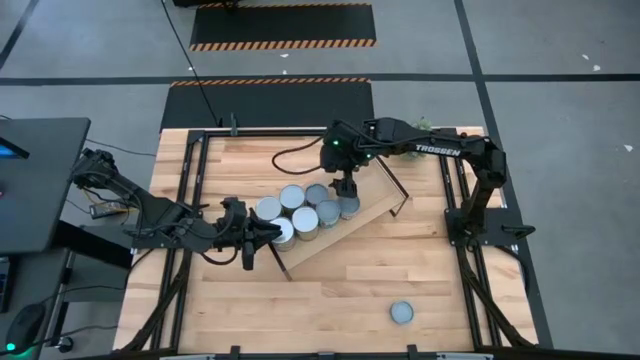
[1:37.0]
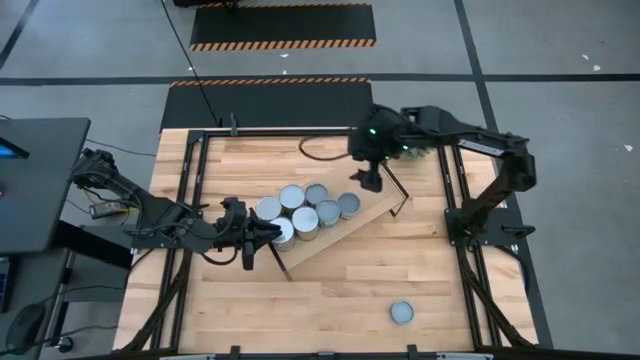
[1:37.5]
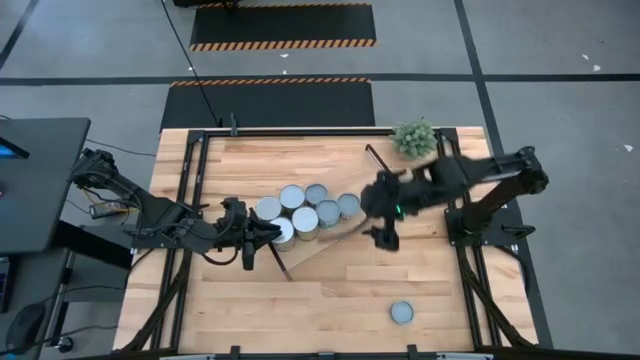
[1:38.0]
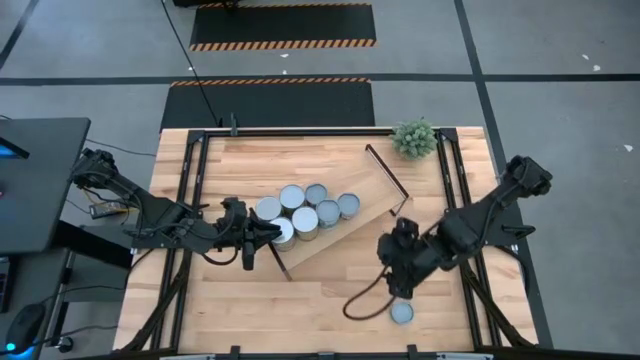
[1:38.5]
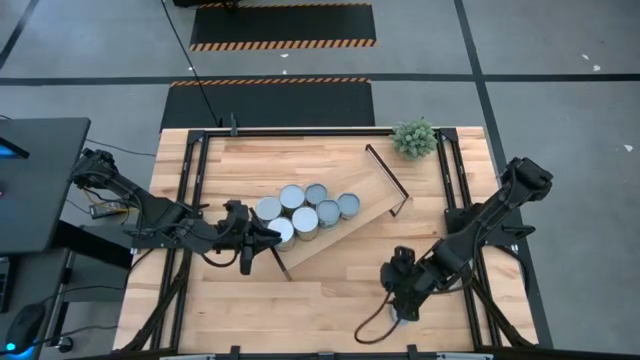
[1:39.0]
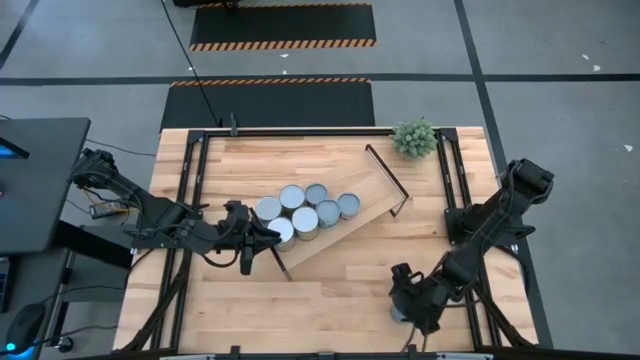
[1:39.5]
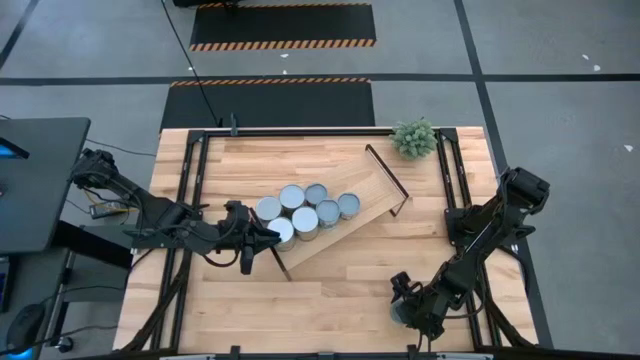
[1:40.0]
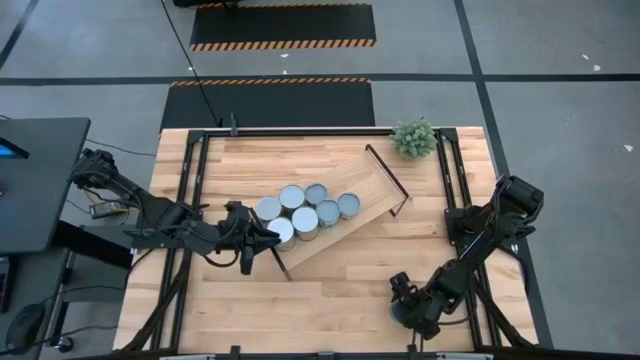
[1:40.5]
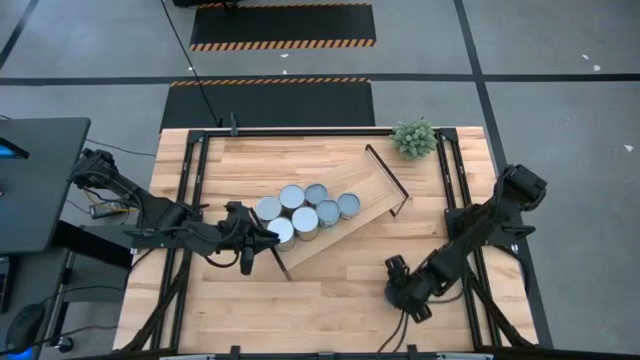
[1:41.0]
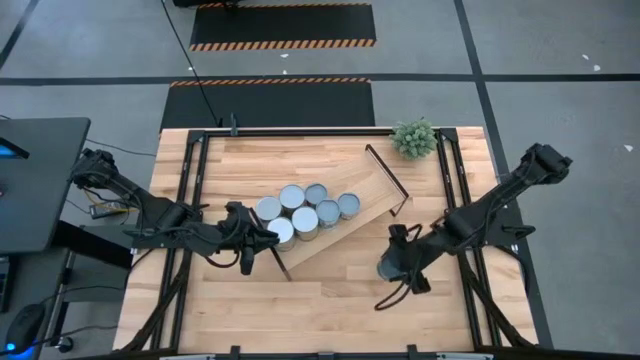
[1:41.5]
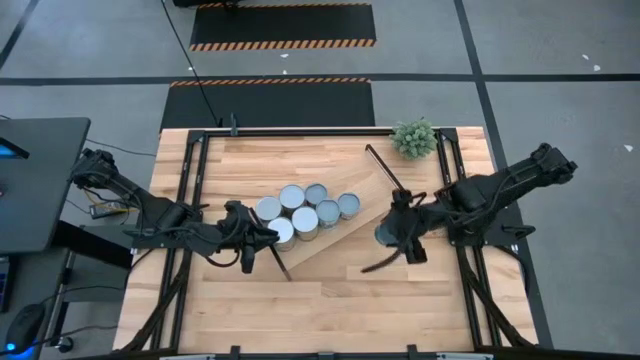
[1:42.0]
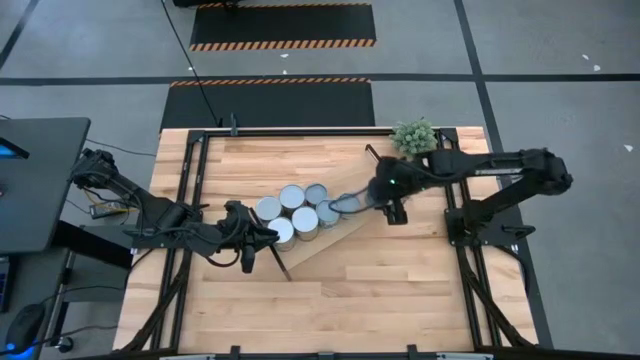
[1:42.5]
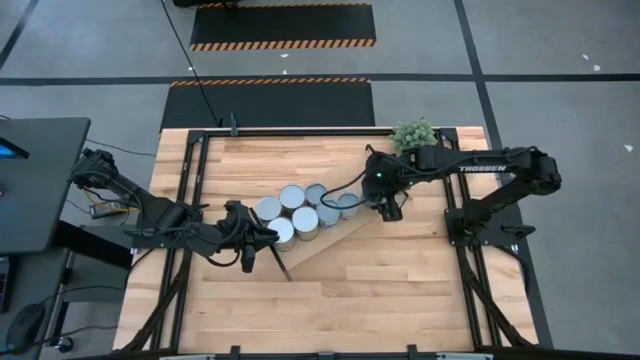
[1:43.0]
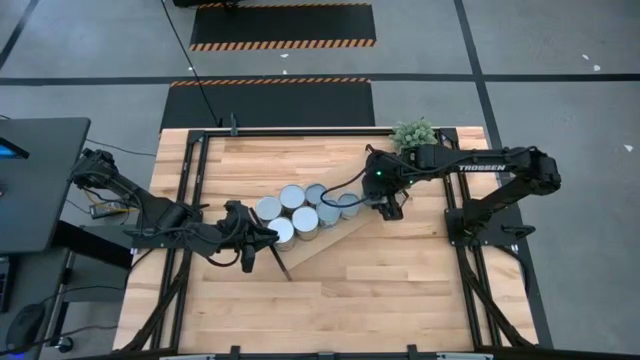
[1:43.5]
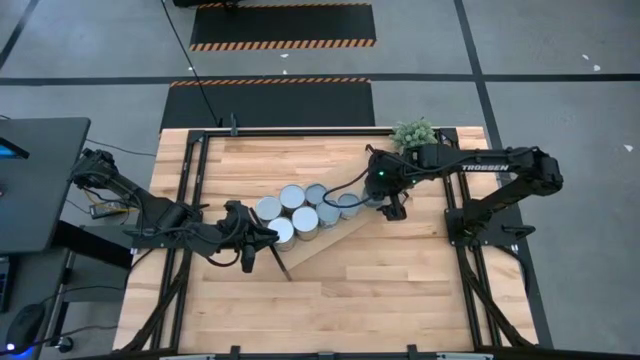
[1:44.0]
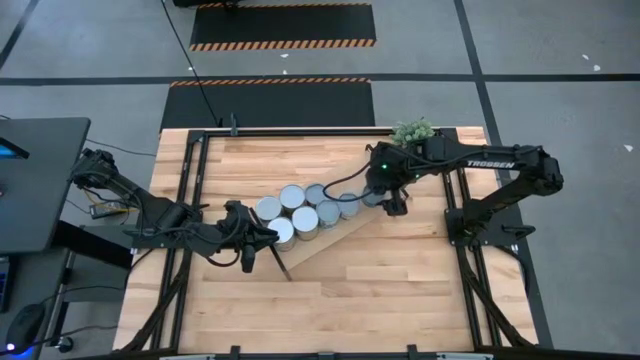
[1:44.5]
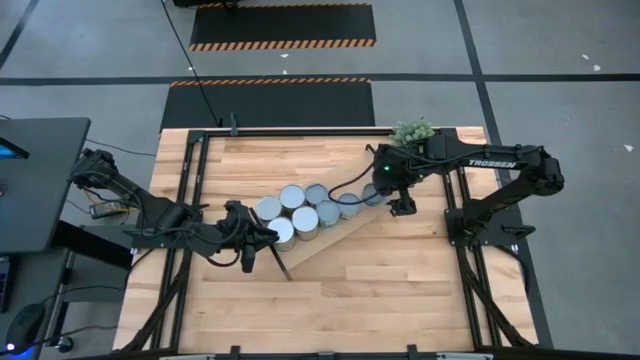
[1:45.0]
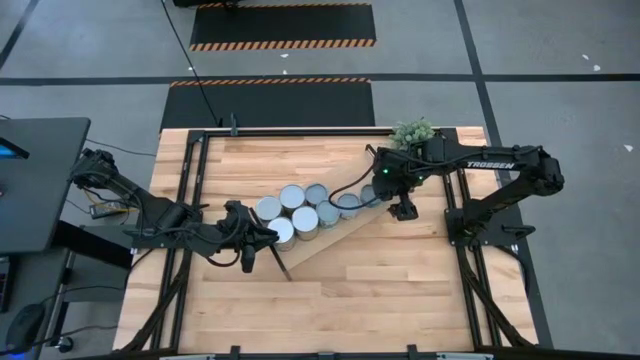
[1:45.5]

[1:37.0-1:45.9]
Task: Pick and place cans onto a shelf
Put the blue tuna can on the shelf

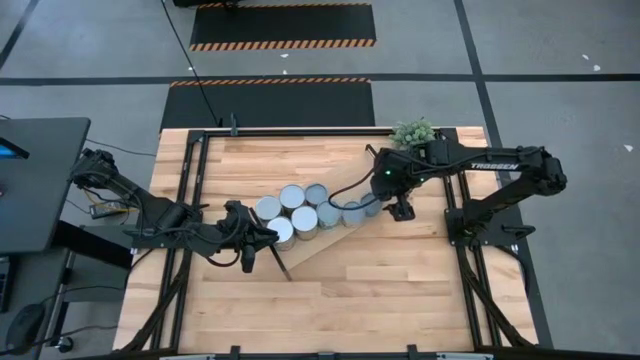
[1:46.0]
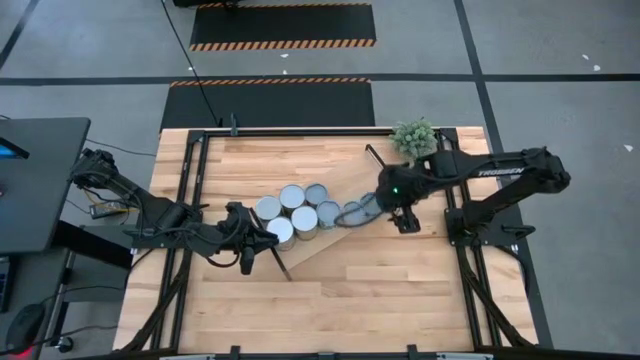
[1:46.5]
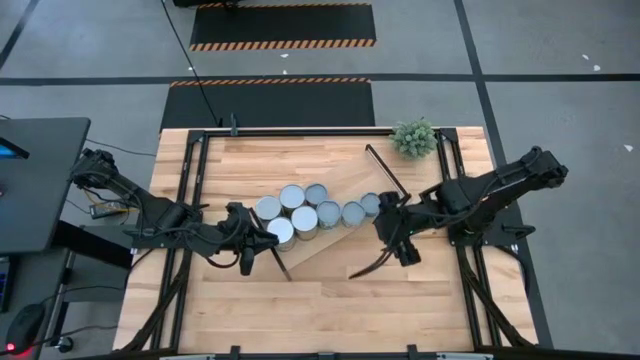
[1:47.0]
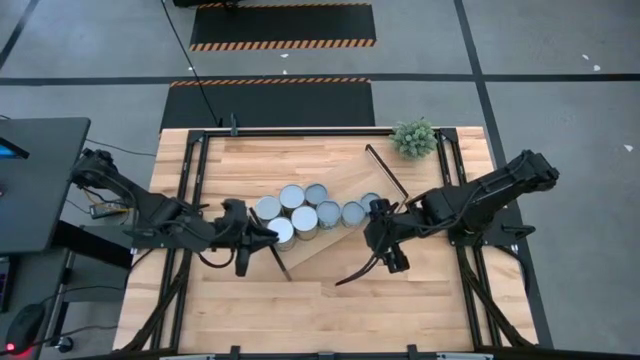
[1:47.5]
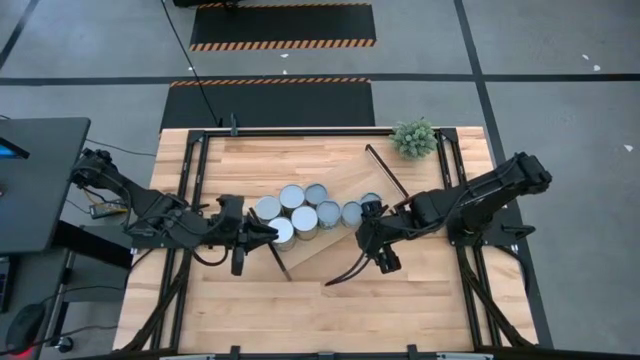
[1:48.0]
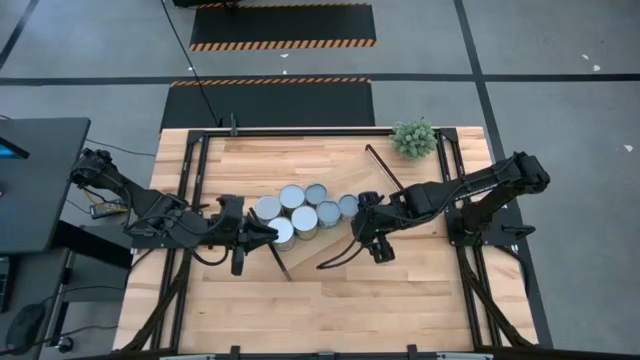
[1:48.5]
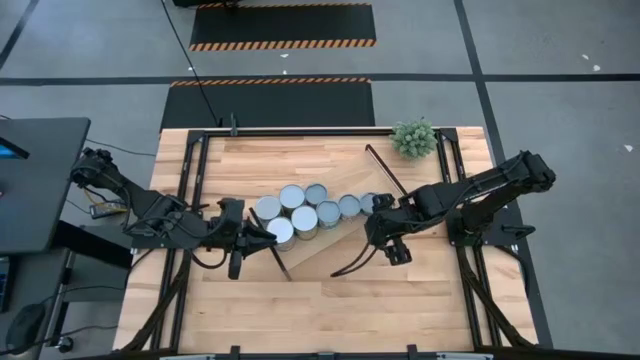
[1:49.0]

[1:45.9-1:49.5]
Adjust the cans on the shelf

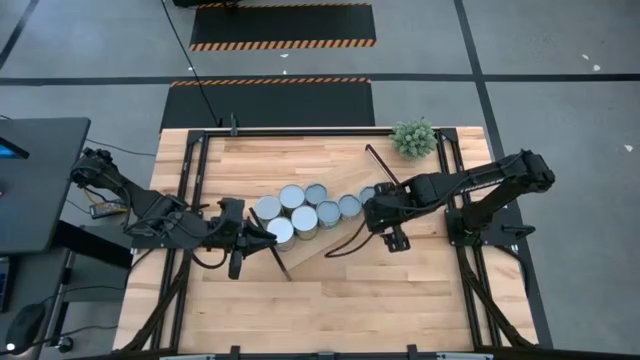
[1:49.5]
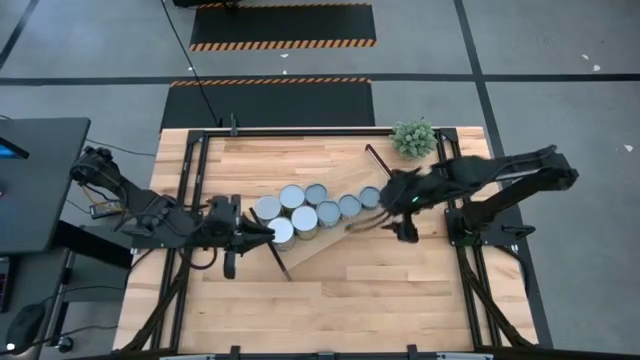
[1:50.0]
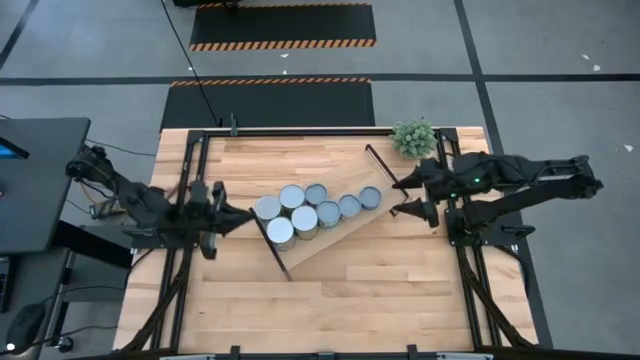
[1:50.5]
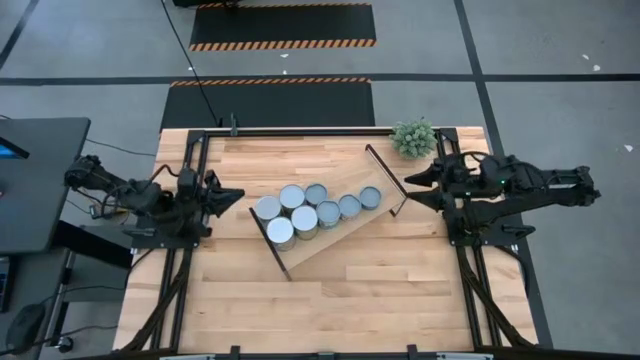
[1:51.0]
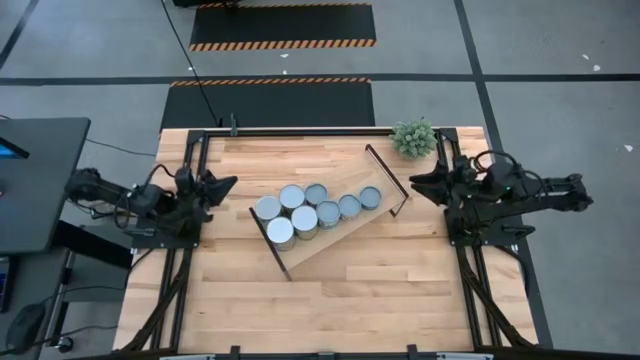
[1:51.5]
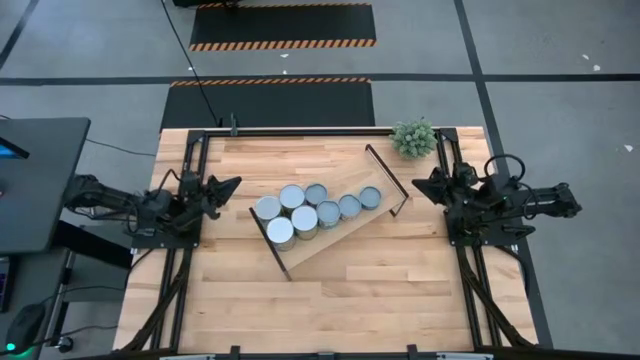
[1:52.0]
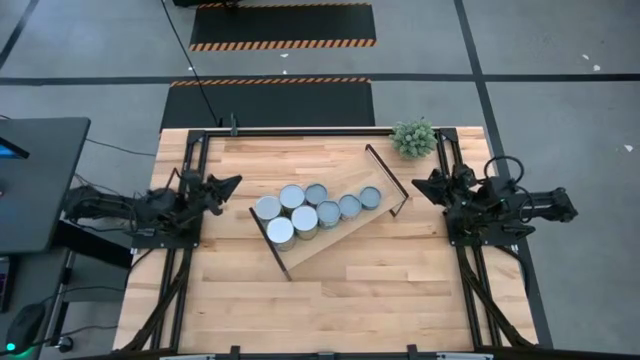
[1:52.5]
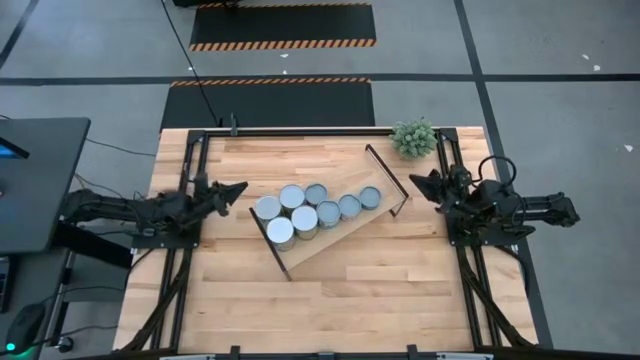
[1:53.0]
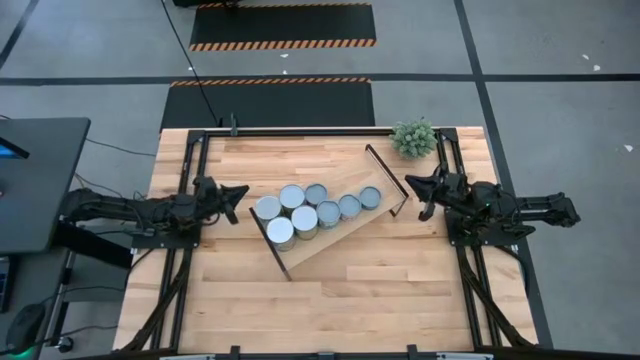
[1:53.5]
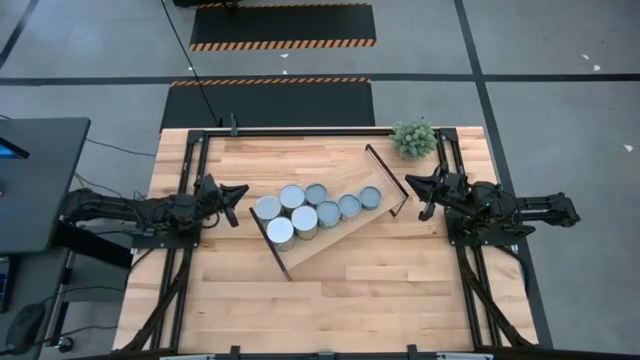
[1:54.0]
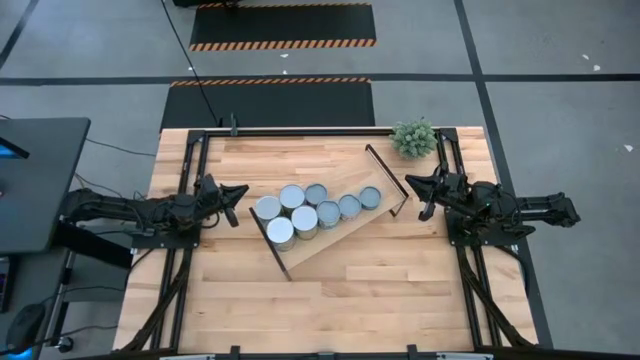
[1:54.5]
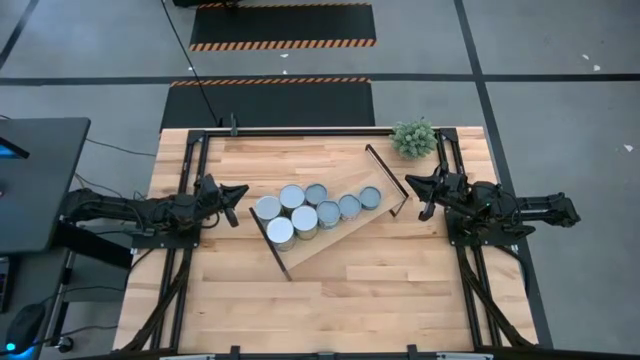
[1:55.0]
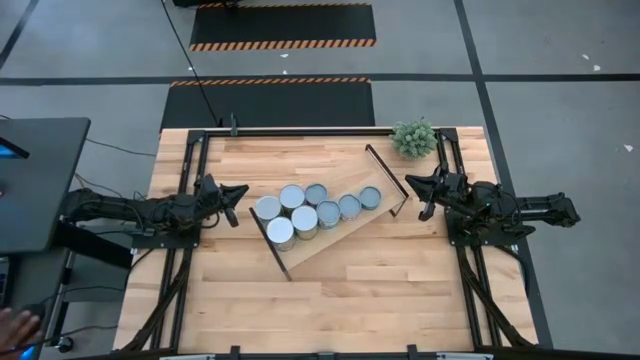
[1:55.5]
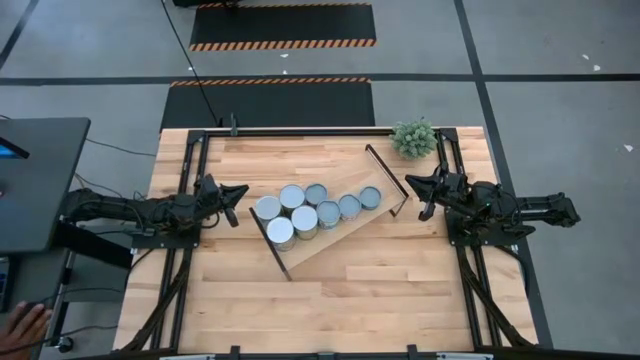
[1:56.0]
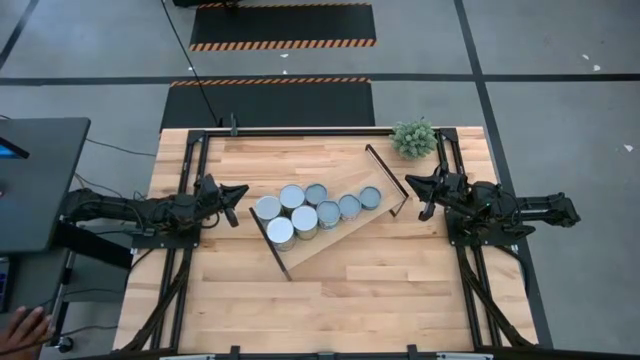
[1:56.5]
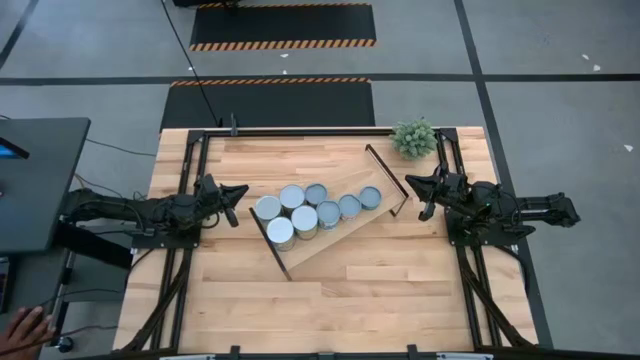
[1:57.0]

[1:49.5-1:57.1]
Return to Home Position

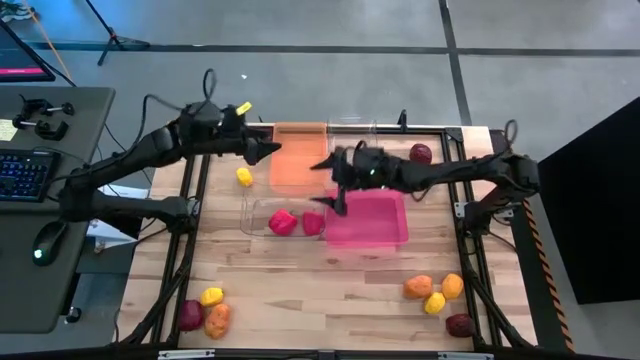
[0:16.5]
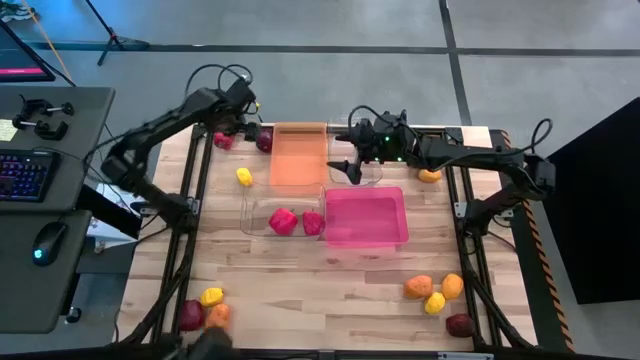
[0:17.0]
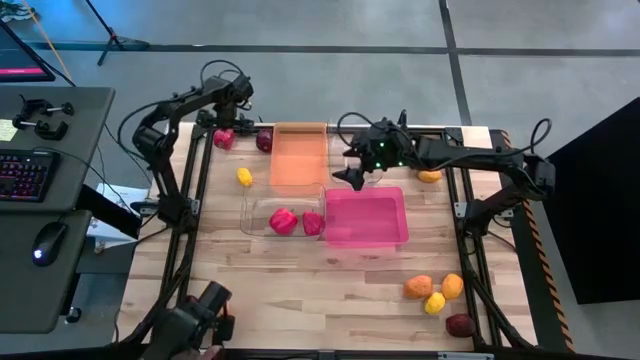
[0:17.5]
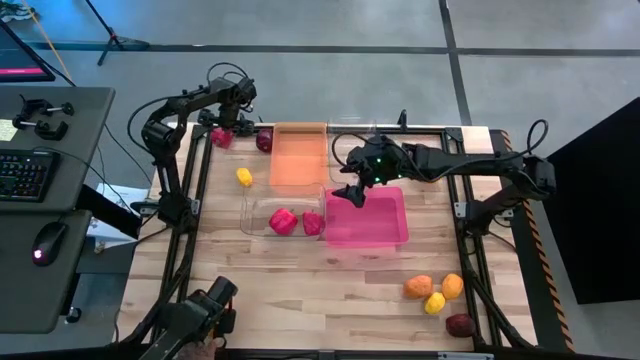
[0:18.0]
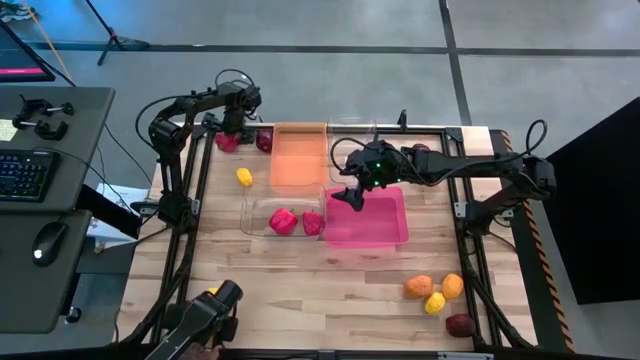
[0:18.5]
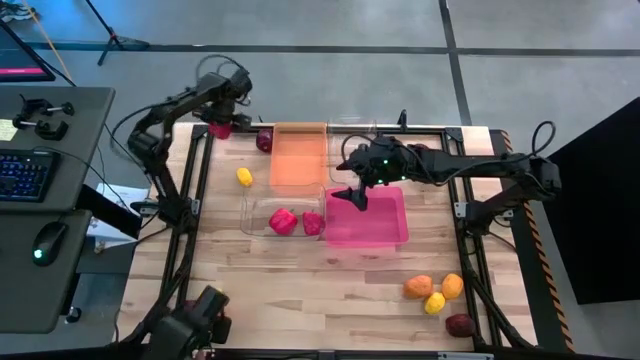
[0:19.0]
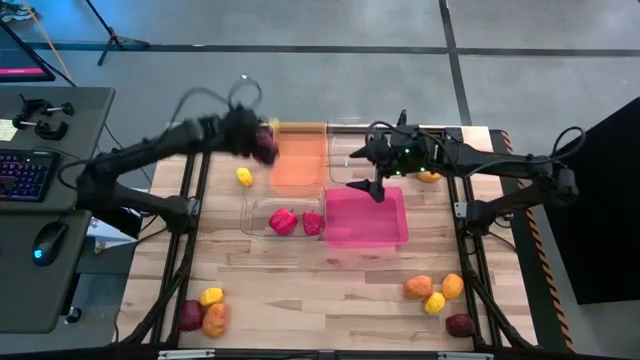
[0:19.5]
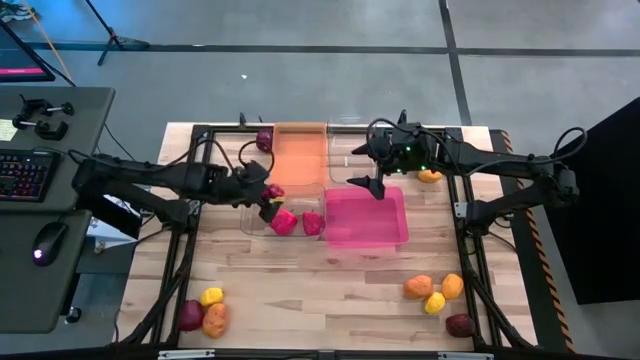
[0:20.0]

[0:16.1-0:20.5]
Task: Sort produce into baskets
Put the red bell pepper into the left transparent bin
